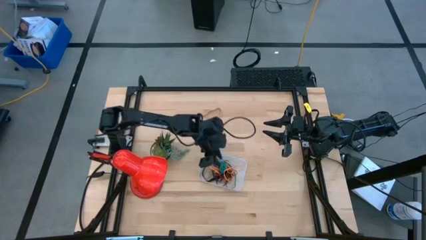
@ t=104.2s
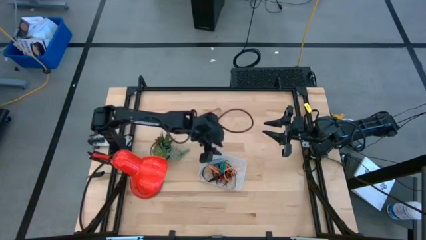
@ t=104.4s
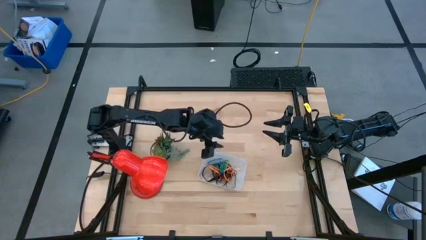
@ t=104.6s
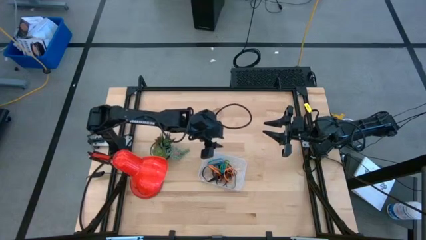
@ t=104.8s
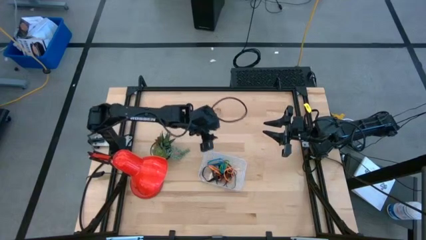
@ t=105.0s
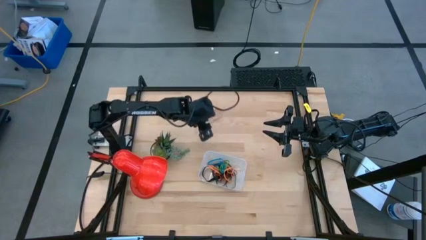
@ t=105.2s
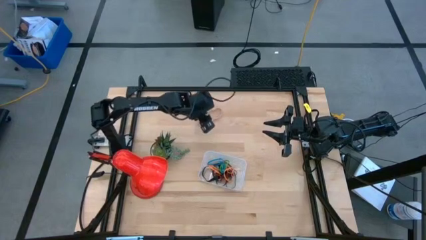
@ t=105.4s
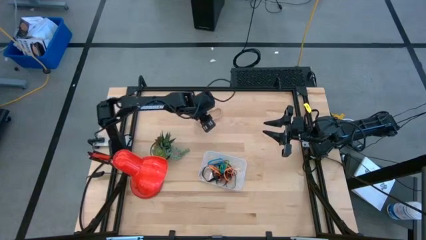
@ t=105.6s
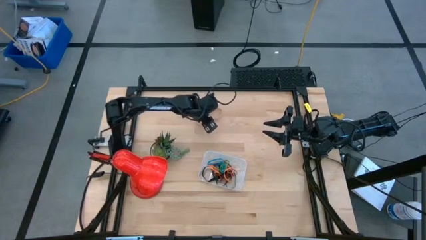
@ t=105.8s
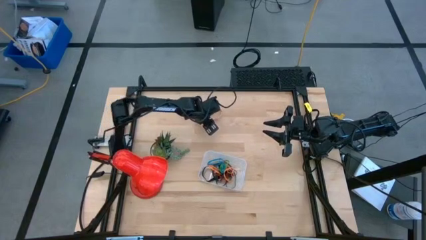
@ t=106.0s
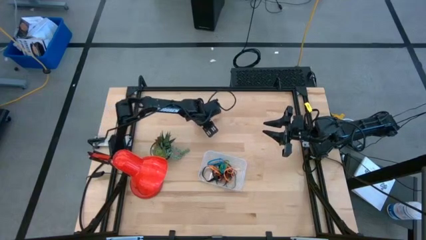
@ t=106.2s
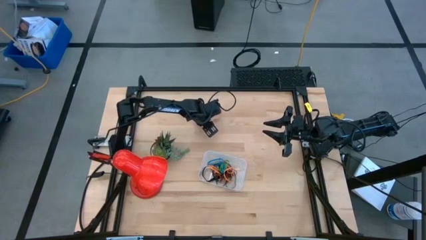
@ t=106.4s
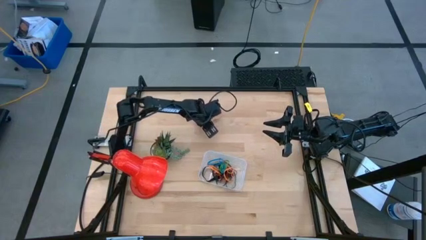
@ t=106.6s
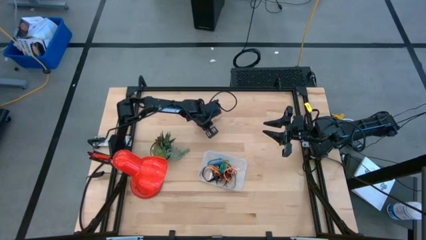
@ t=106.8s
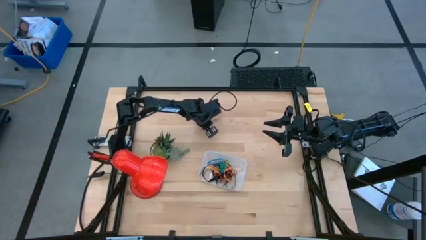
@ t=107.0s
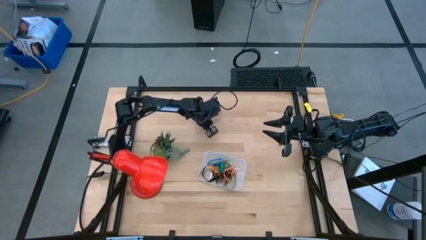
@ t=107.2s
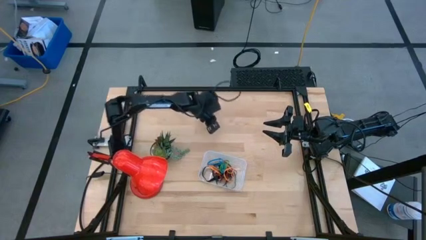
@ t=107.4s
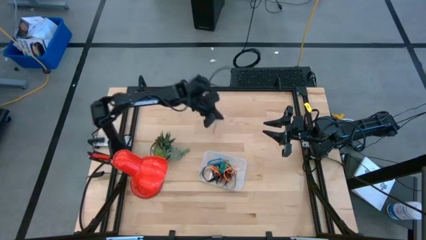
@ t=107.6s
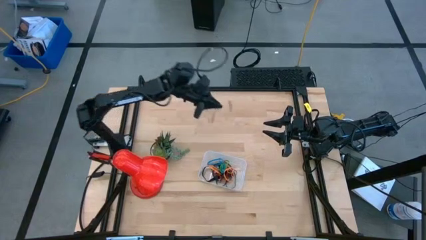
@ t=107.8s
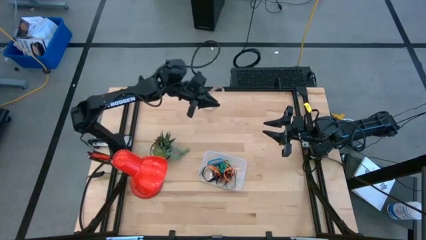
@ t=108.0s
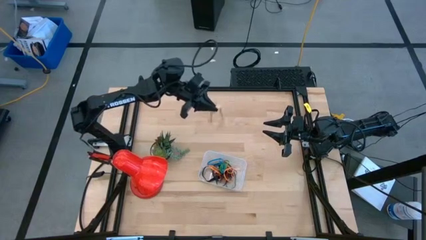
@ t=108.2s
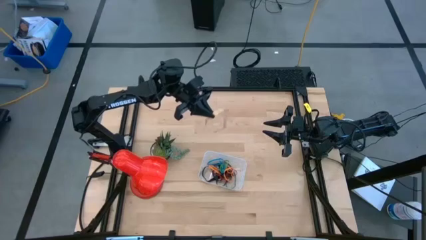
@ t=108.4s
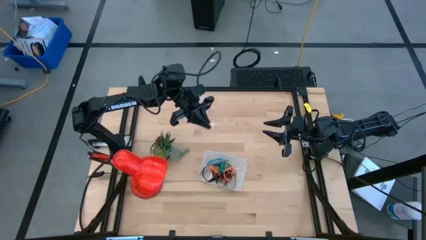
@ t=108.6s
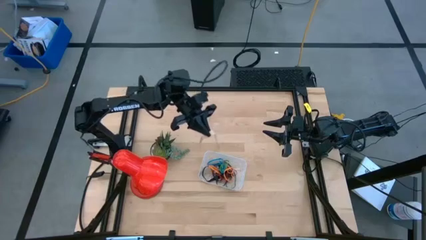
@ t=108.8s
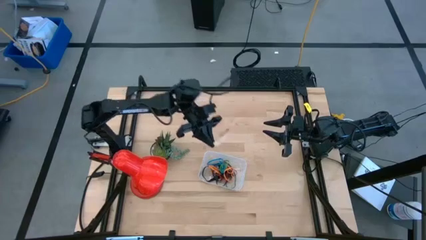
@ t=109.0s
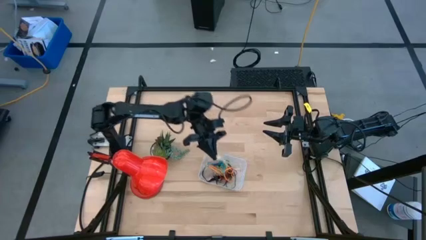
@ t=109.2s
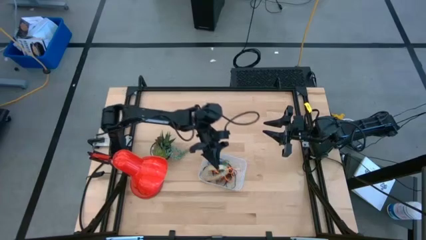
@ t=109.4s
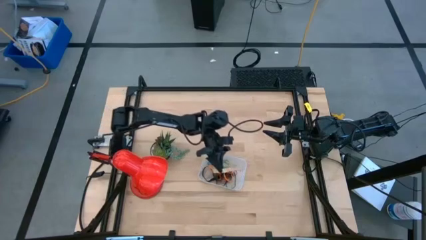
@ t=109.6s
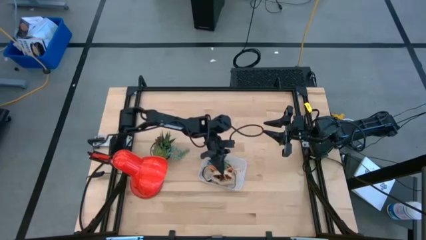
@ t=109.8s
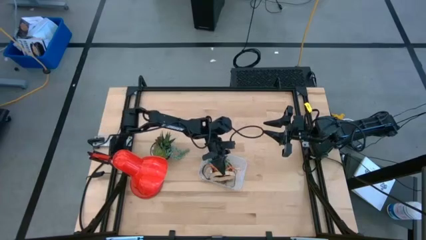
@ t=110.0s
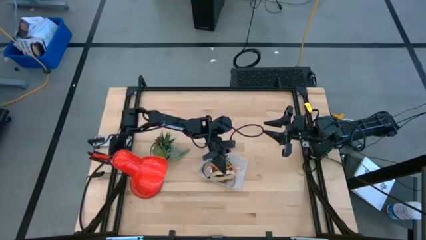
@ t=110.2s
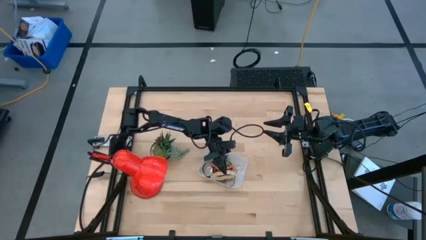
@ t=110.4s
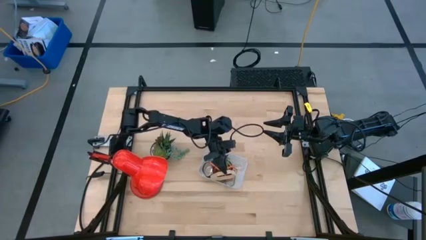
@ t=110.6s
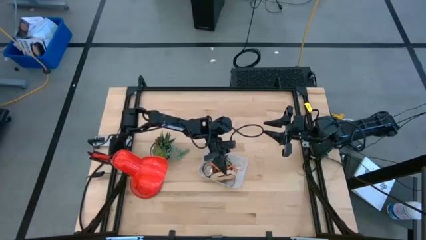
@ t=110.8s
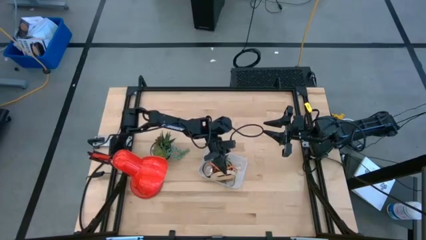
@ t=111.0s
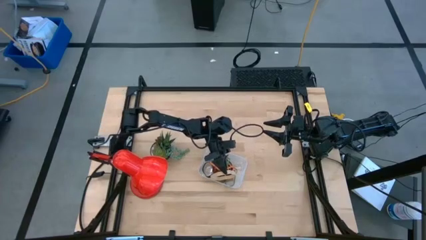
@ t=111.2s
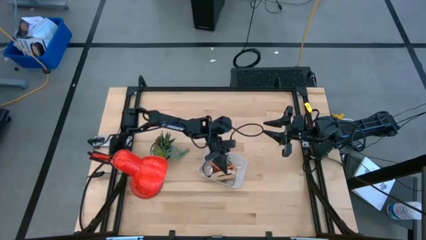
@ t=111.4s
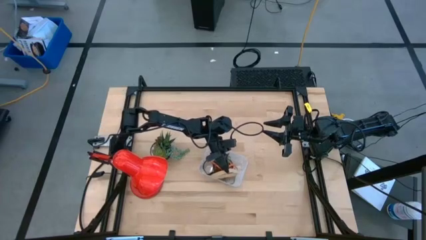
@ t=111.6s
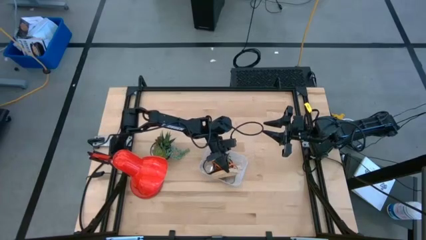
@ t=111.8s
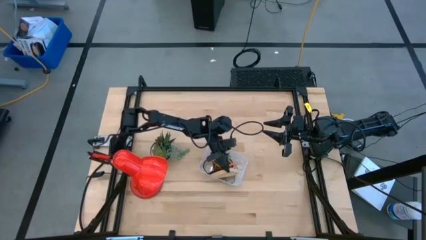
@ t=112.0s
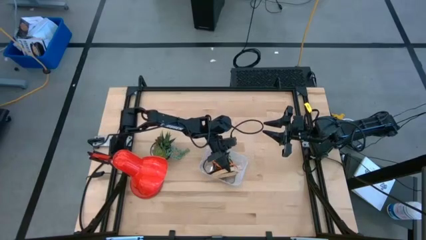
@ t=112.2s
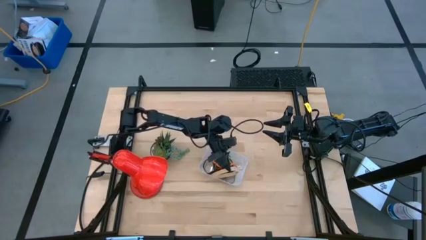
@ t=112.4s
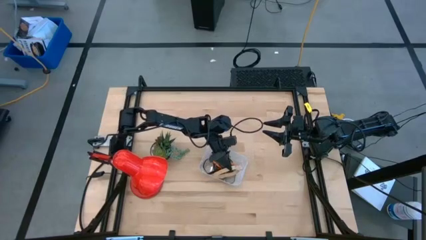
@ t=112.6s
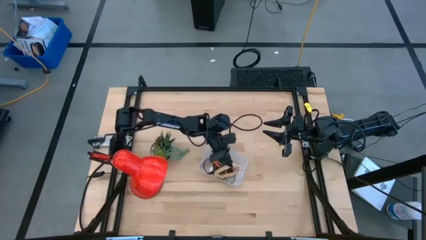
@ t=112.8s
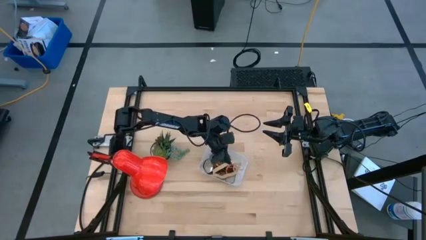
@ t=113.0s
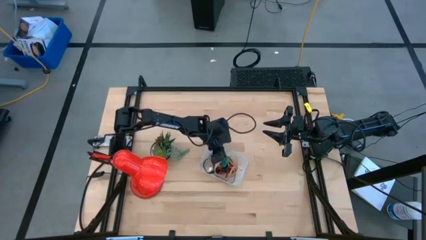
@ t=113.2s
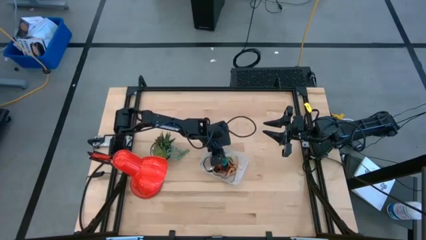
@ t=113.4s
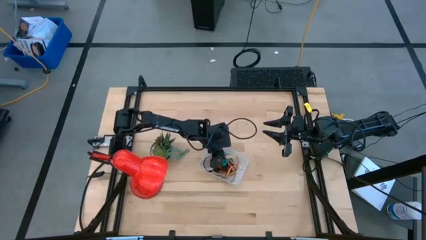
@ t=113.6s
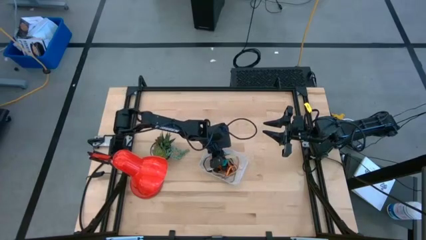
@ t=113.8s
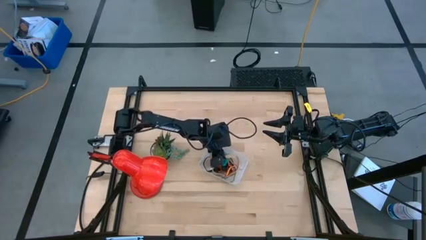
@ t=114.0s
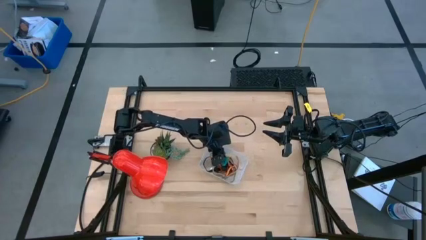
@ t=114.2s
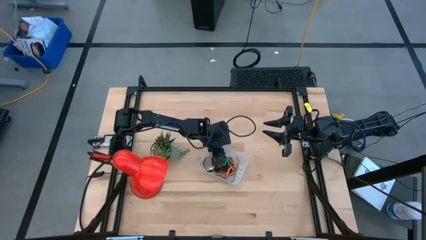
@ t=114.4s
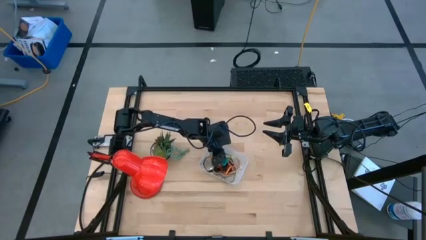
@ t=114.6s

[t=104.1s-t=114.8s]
Task: Pick and place rubber bands into bin
Put the light brown rubber band into the bin

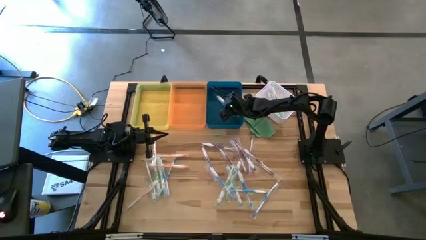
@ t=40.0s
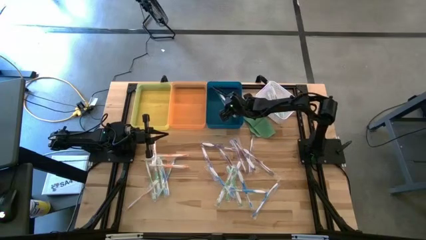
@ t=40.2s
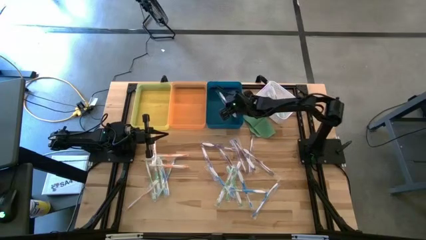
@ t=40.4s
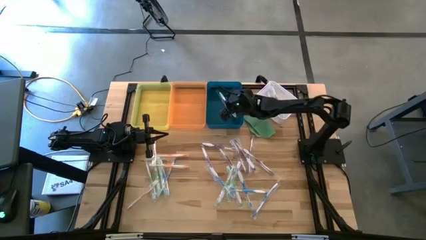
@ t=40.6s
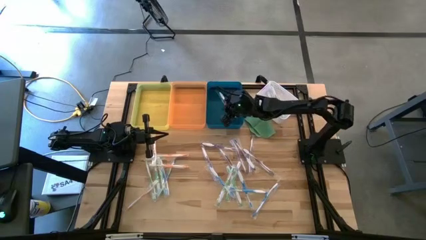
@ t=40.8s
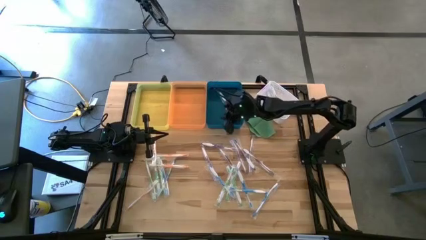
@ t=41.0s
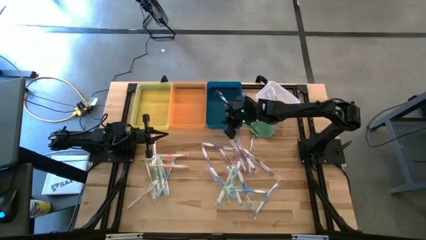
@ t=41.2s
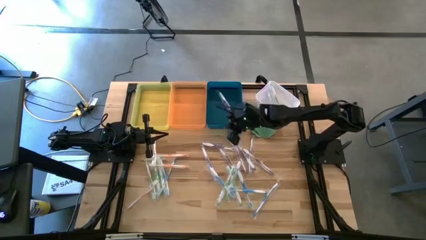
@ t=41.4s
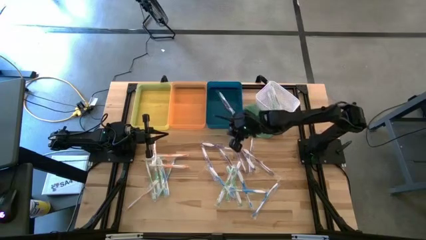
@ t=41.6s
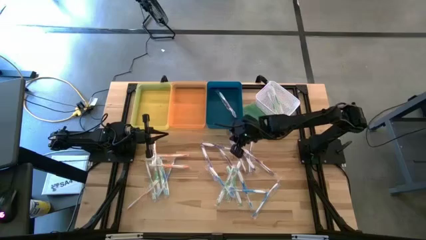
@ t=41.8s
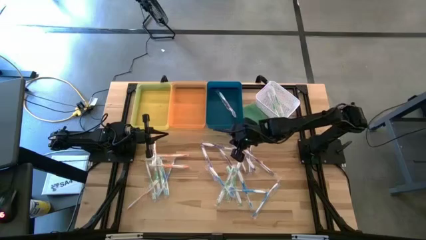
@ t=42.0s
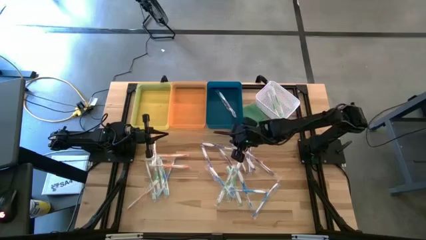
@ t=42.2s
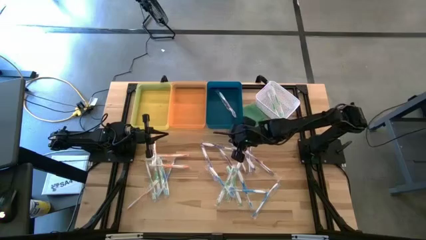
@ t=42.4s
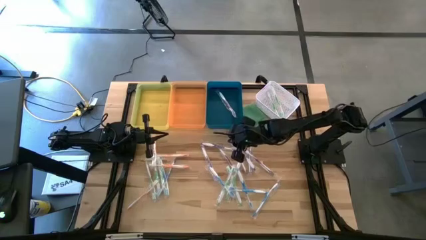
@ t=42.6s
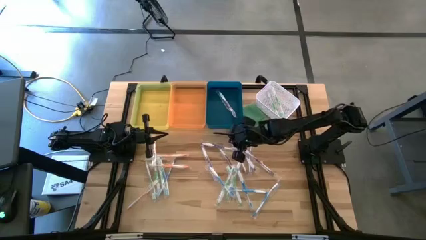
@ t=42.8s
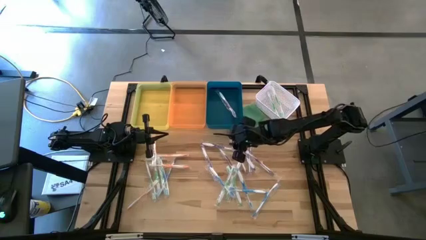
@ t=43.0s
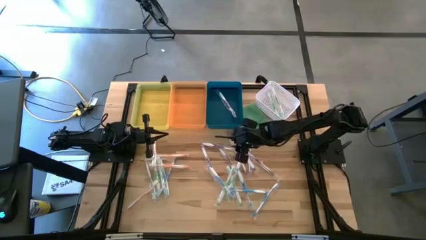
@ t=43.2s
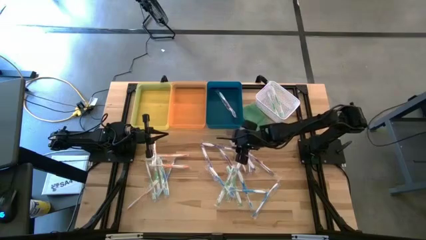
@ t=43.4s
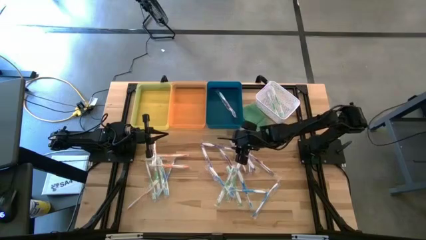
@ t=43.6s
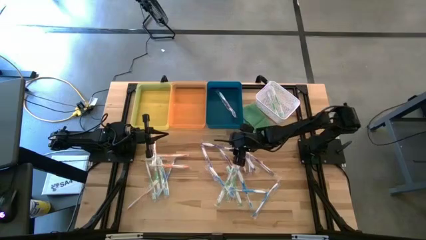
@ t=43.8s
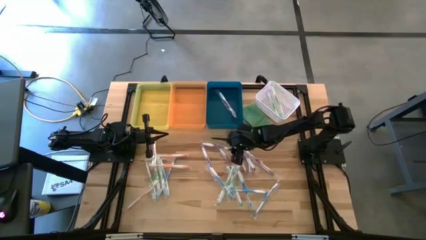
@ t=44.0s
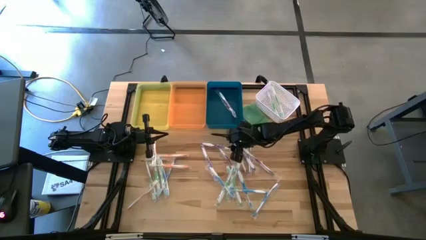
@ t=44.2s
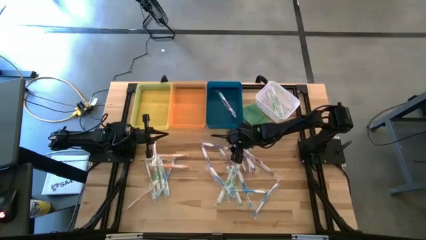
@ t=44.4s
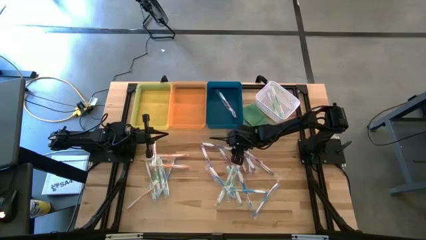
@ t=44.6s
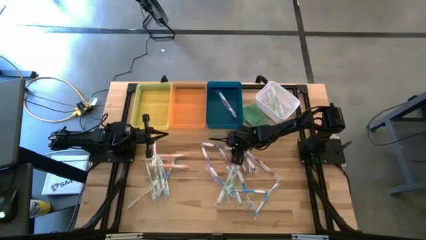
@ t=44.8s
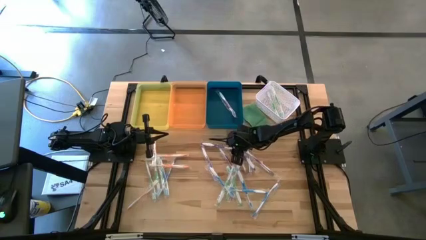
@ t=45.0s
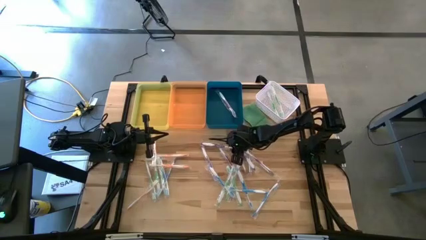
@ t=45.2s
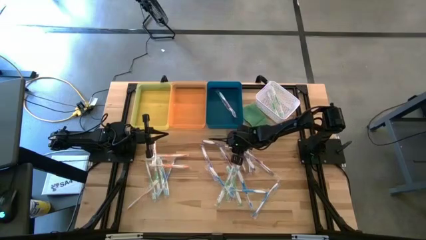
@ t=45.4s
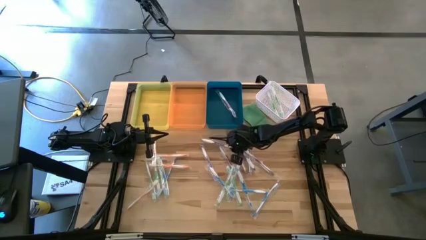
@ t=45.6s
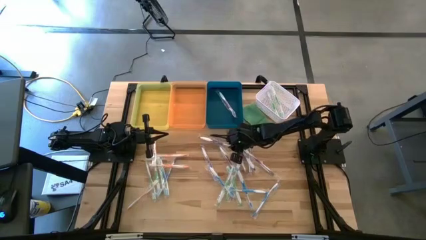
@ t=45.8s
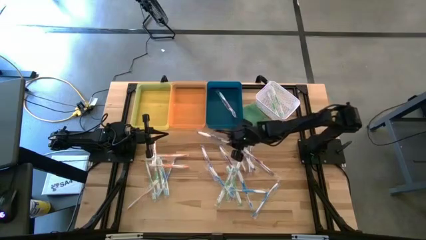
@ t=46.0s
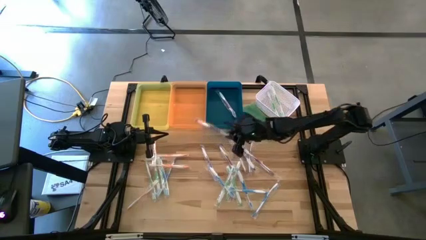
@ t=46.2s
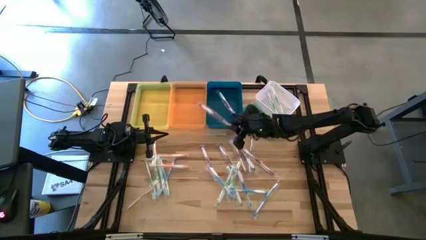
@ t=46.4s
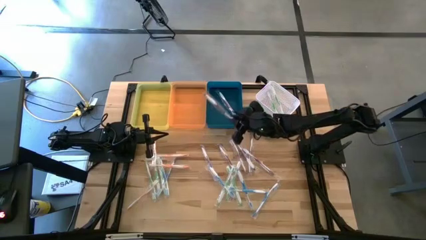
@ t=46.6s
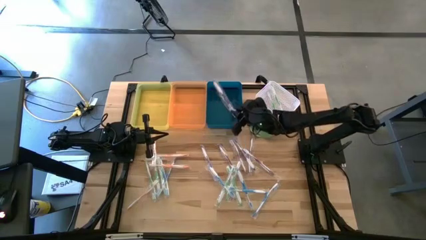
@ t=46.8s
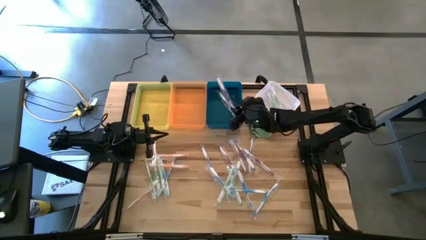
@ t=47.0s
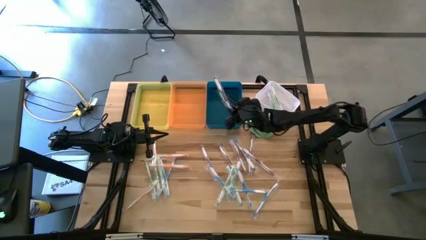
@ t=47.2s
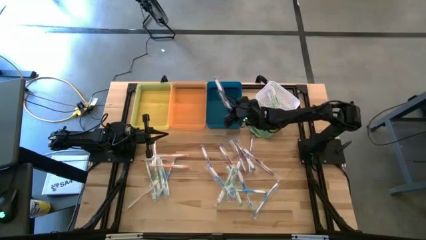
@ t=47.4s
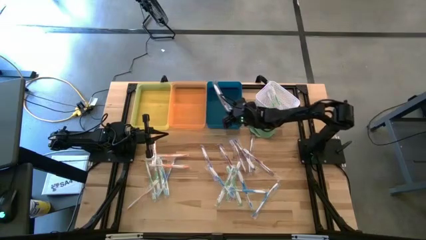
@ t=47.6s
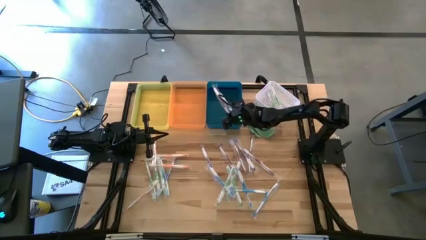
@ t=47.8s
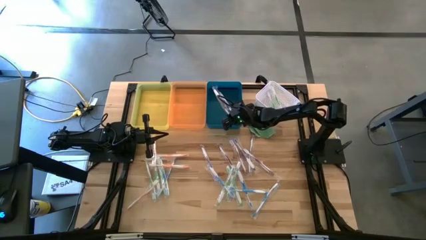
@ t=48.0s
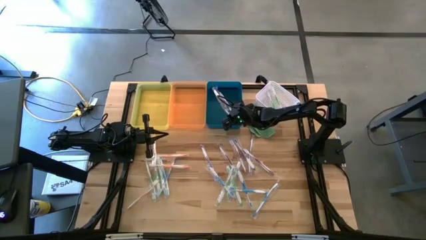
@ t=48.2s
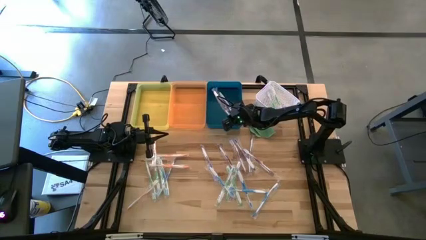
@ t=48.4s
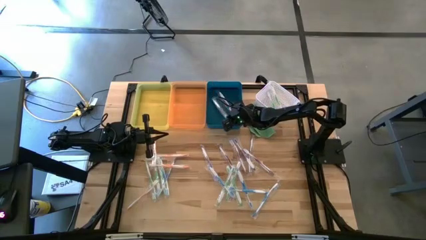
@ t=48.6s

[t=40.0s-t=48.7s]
Task: Pick & Place Toothbrushes
Put the purple toothbrush into the blue bin
